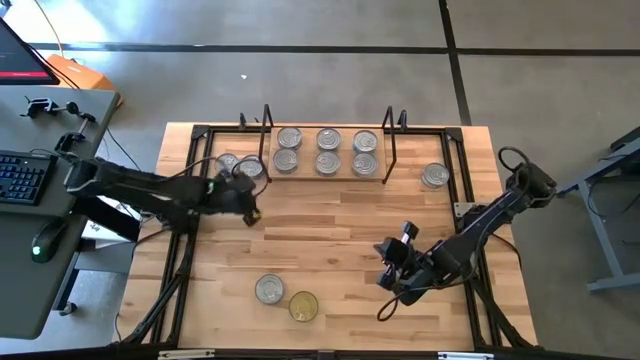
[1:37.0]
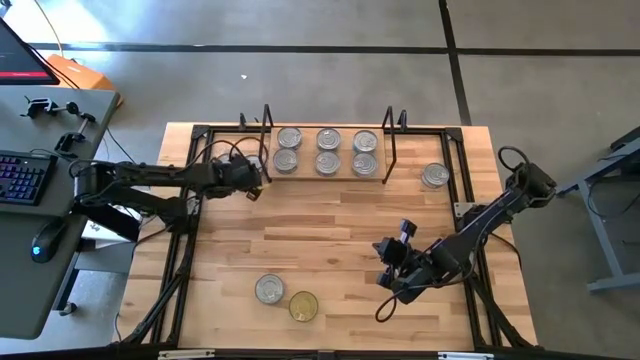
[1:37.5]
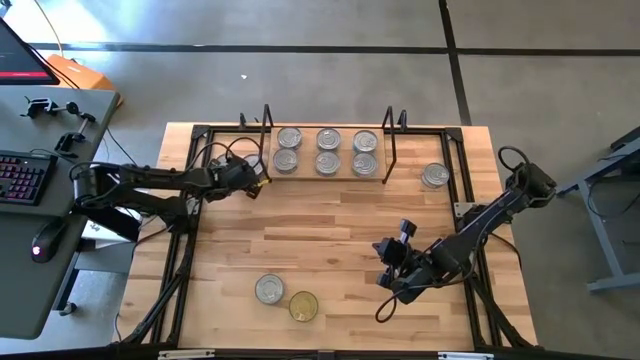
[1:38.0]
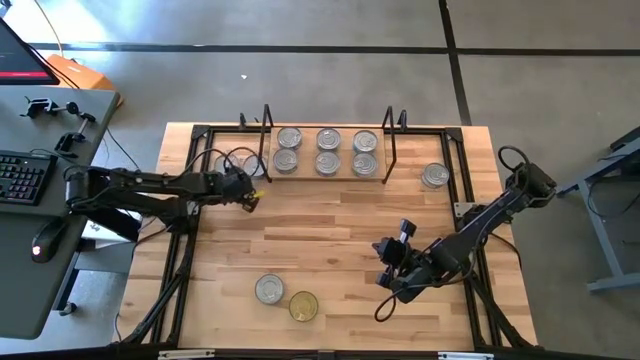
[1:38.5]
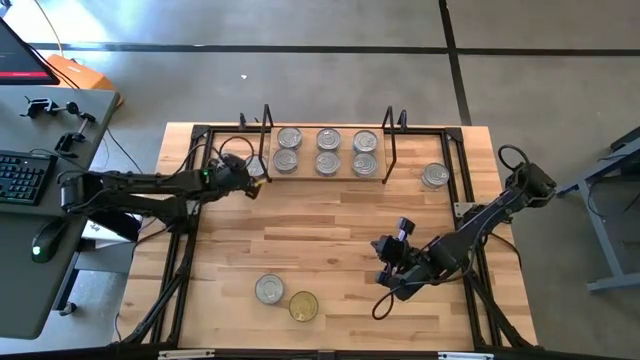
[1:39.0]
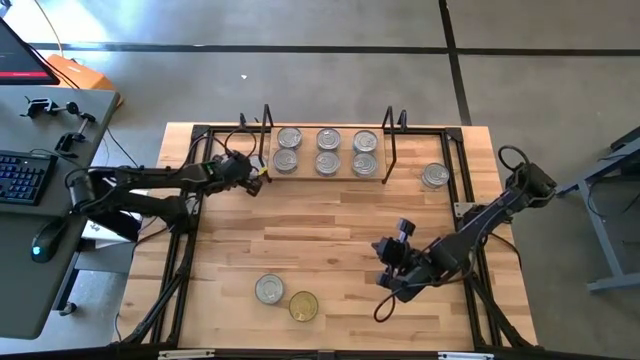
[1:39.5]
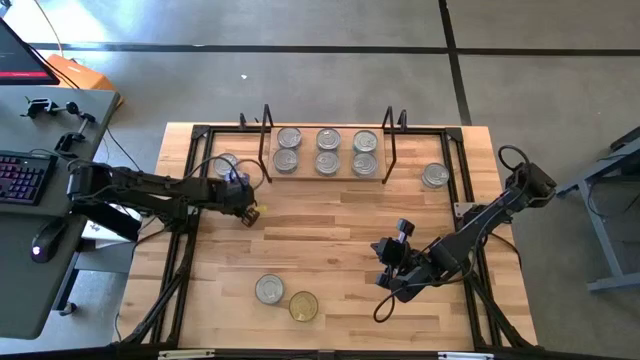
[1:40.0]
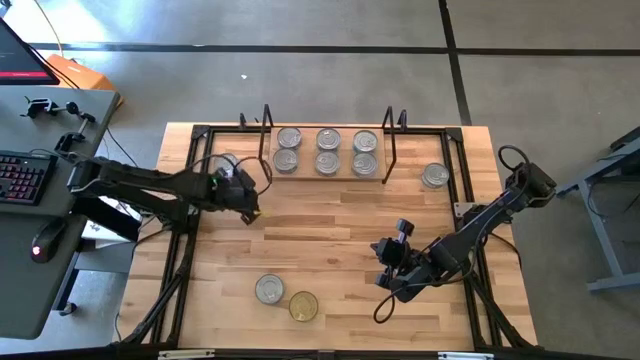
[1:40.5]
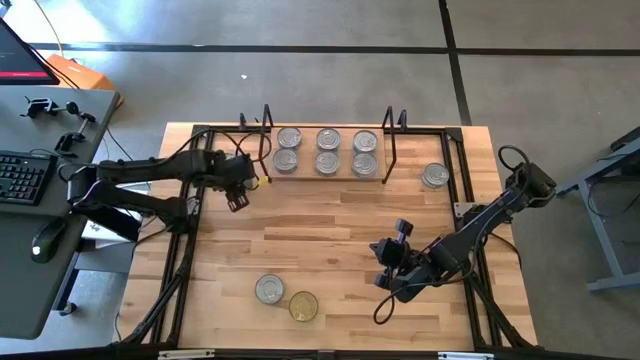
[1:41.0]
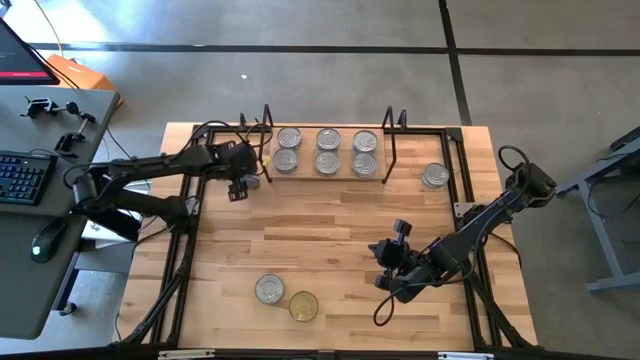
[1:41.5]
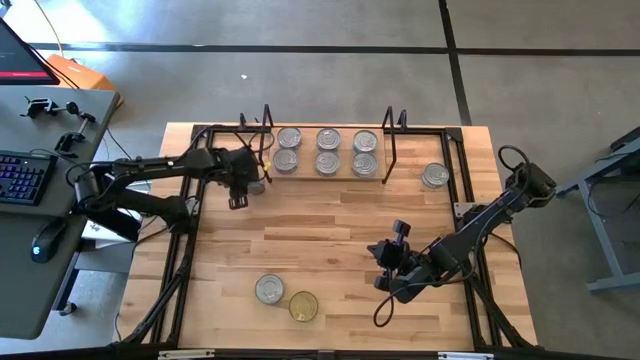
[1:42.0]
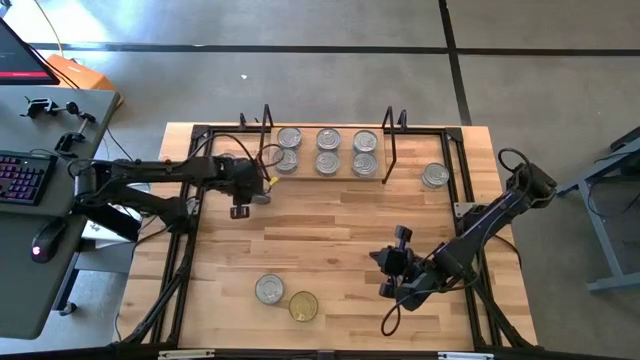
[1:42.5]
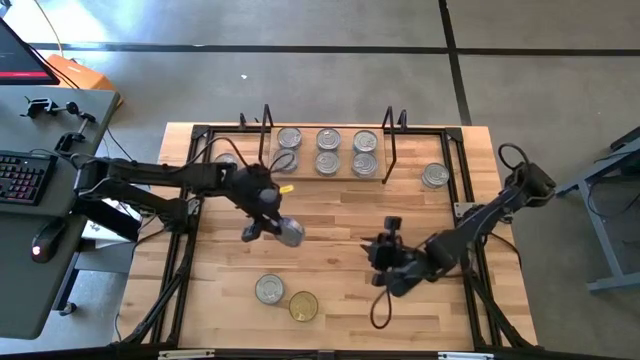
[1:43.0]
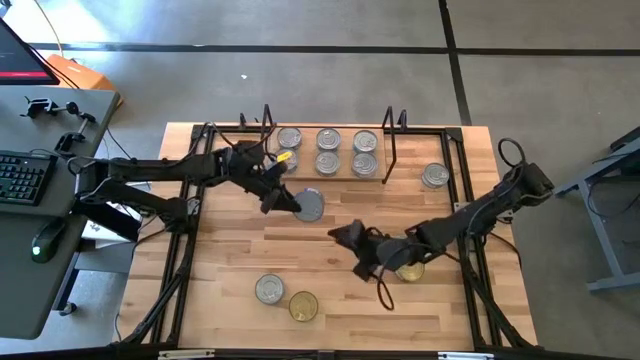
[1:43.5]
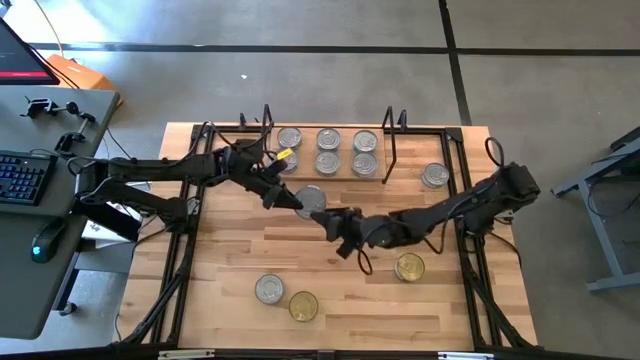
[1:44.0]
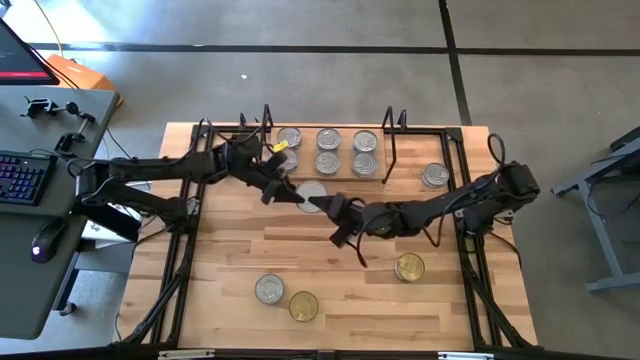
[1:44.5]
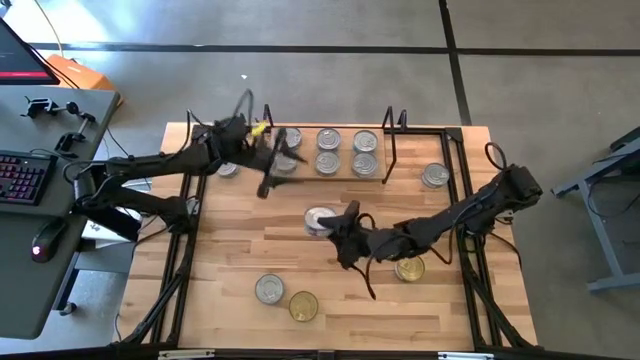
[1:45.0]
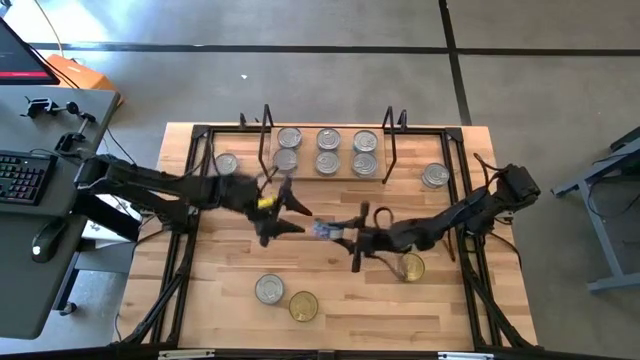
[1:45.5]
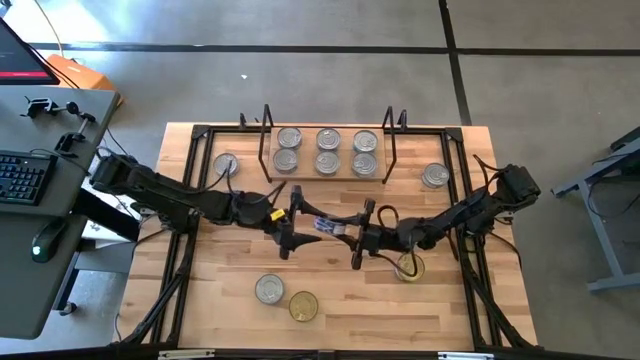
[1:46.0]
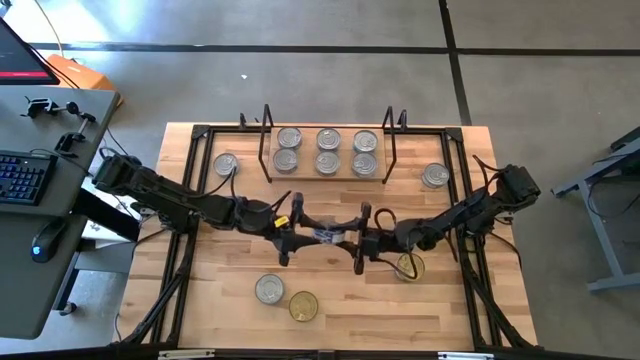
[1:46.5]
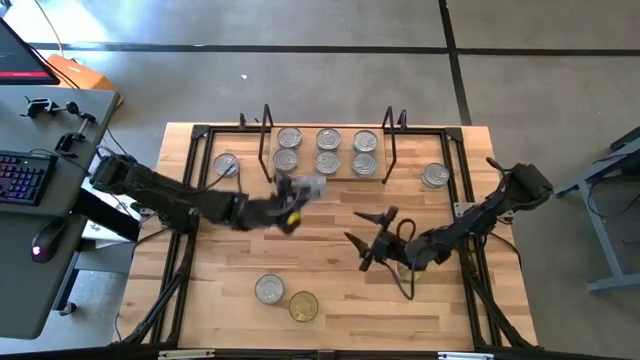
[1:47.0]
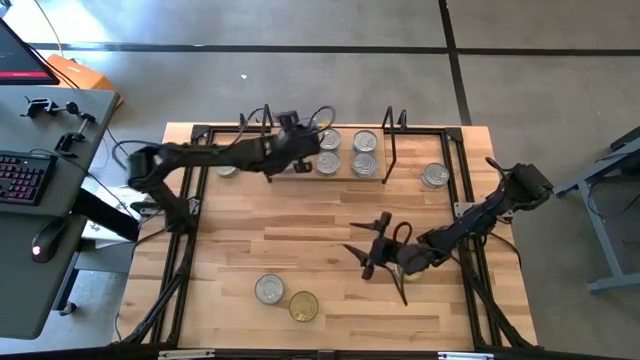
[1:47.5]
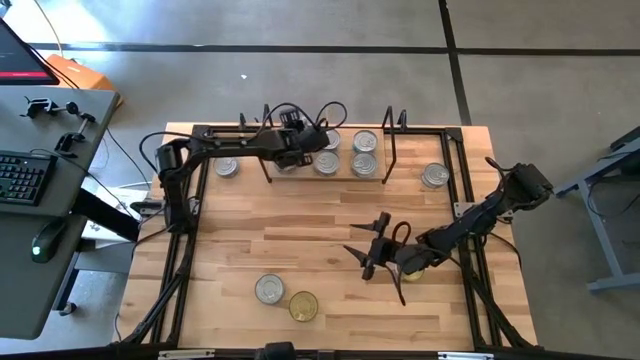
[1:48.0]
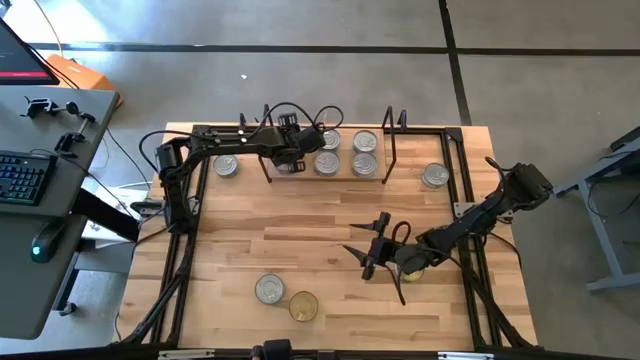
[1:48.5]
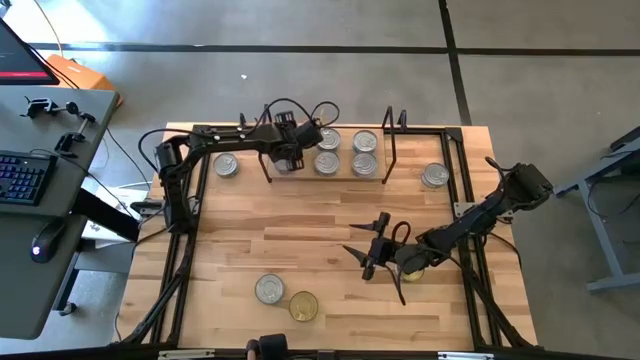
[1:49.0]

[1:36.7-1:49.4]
Task: Stack canned seafood by type on shelf
Stack the blue tuna can on top of the other blue tuna can on the shelf
